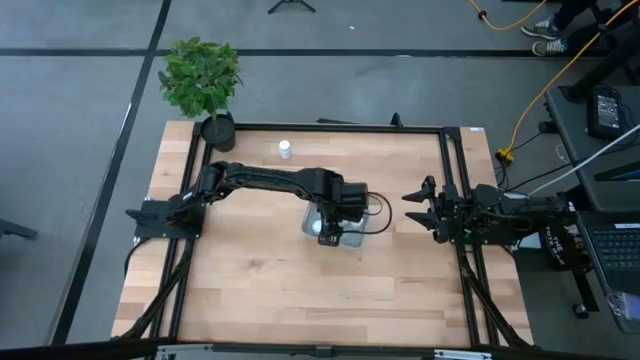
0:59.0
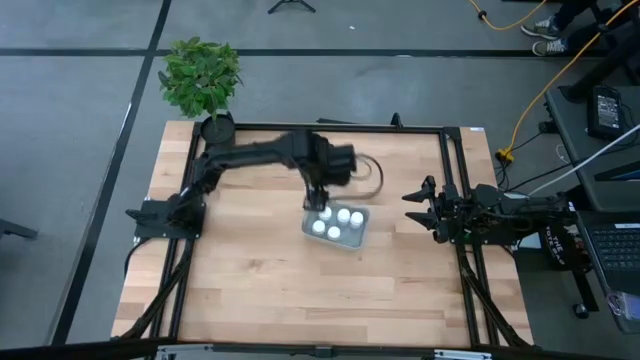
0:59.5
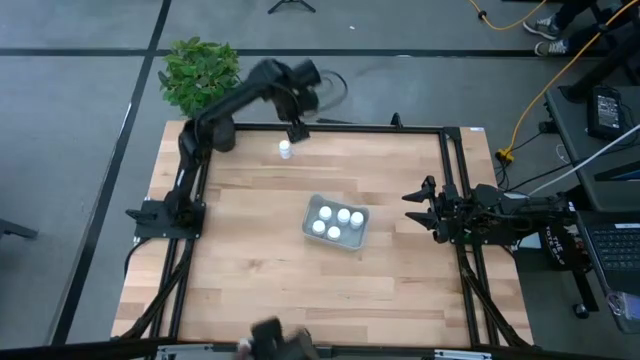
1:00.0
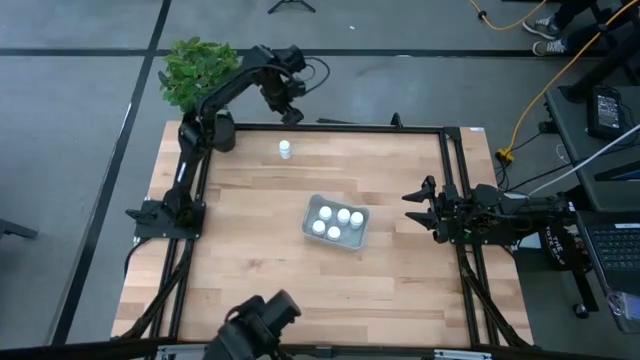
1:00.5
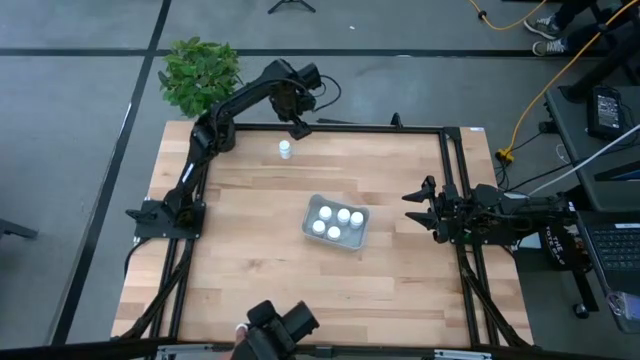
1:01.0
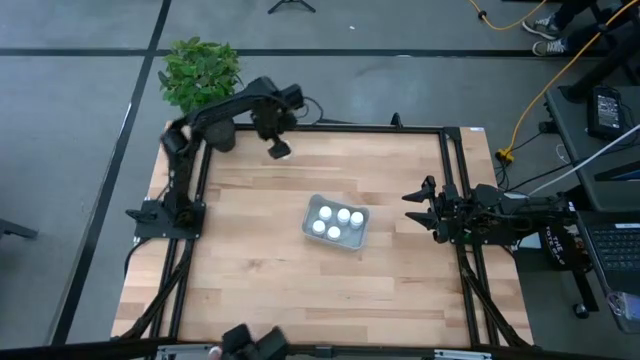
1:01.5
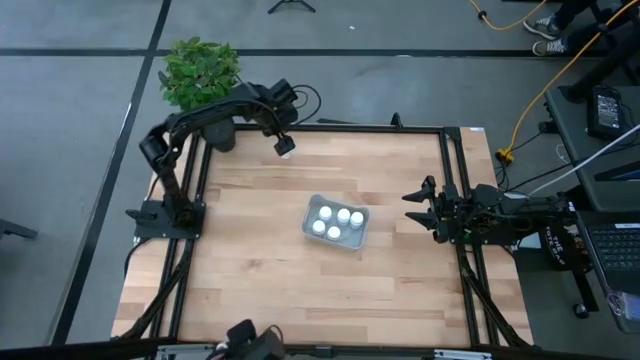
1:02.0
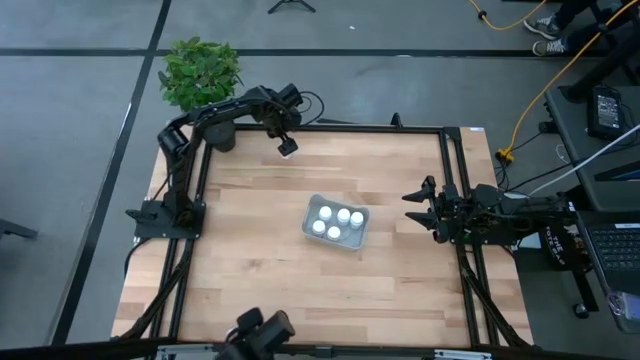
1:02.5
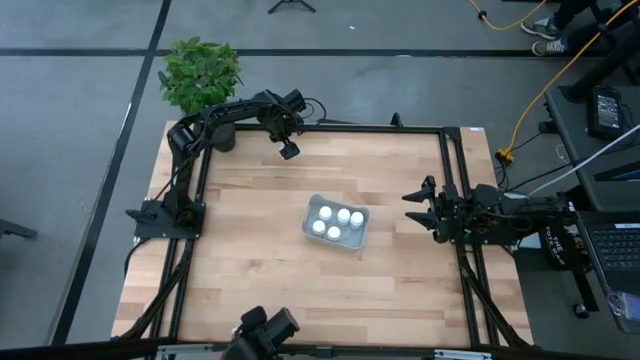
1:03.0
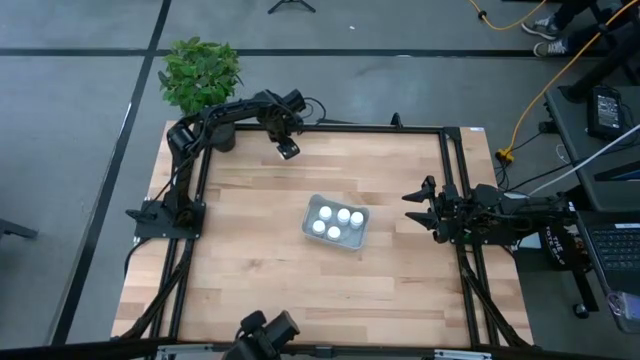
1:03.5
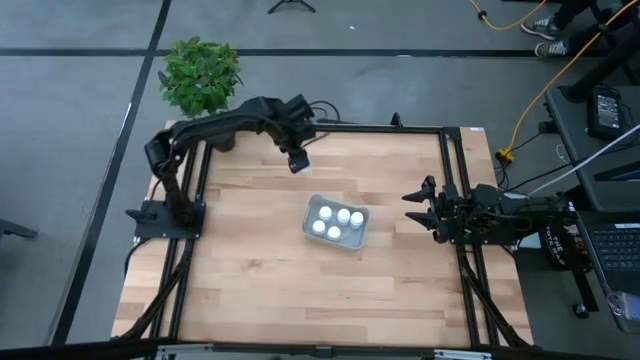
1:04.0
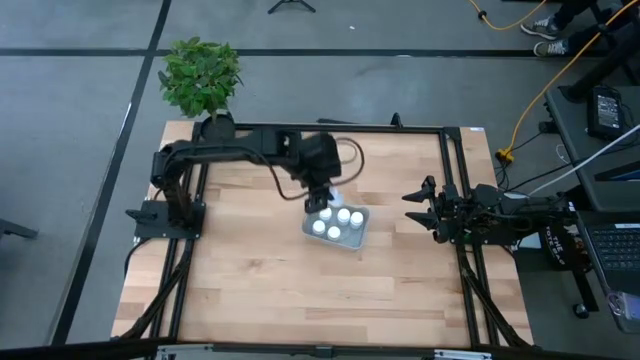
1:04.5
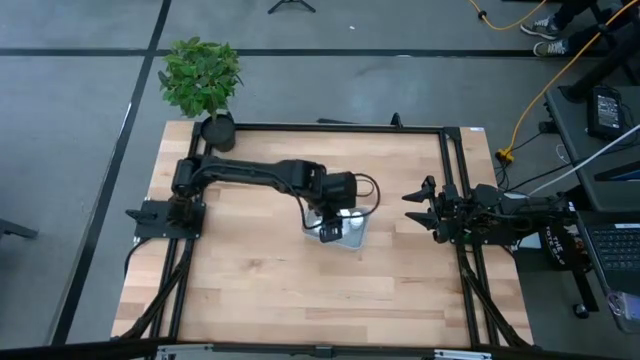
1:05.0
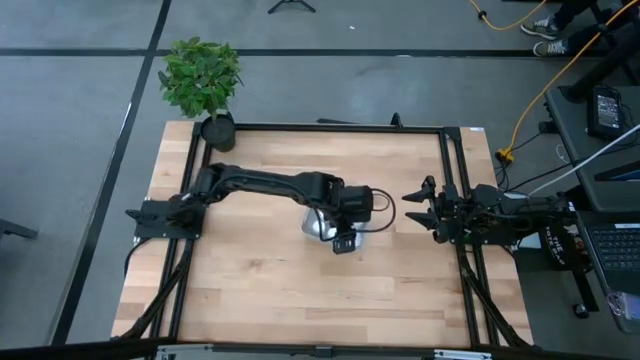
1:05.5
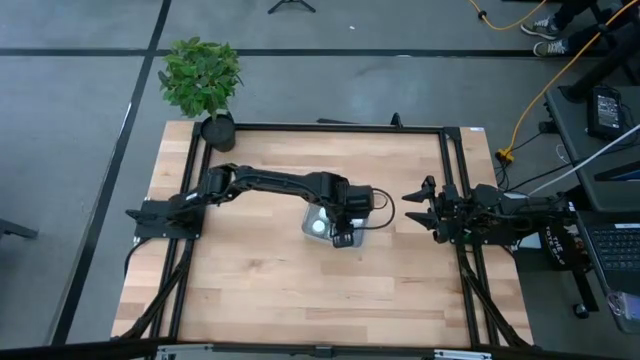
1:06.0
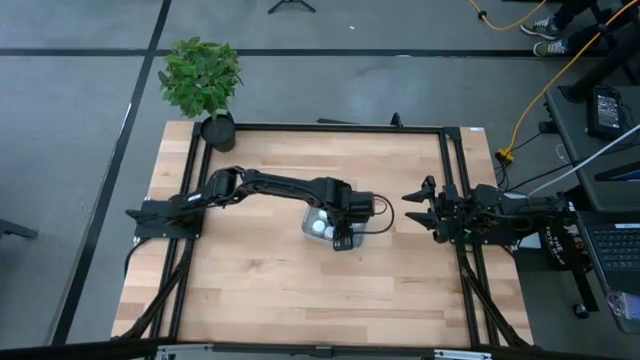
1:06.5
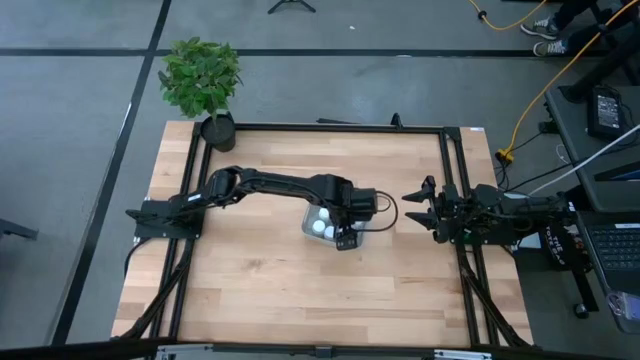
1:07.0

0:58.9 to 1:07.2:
Task: Pick and place pill bottles into a basket
Put the white large pill bottle into the bin

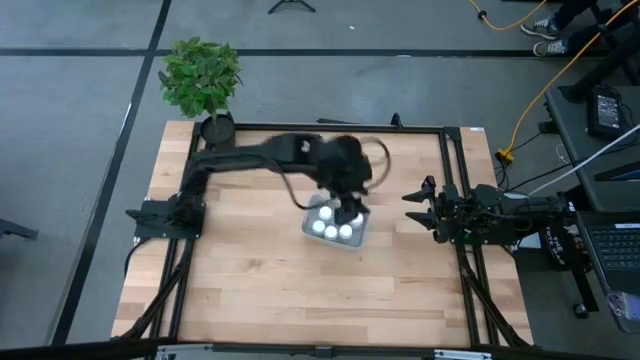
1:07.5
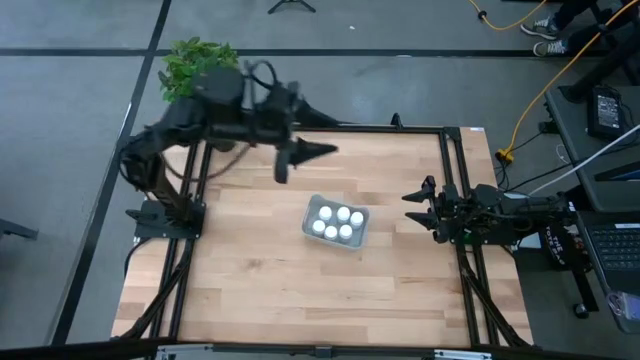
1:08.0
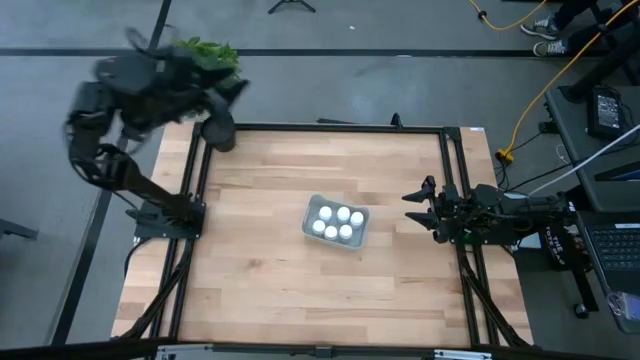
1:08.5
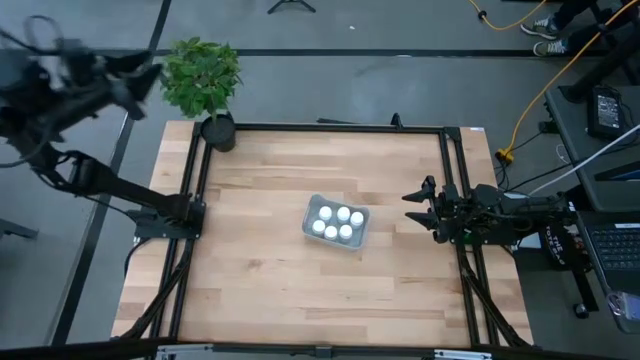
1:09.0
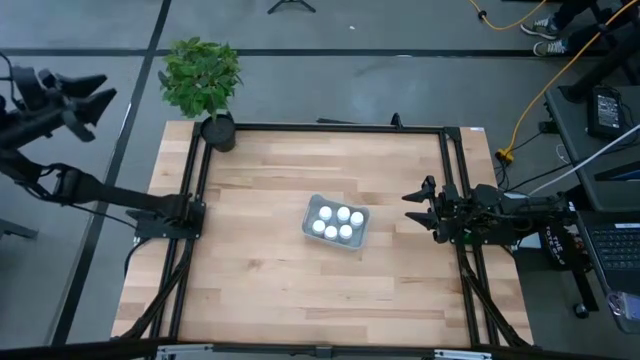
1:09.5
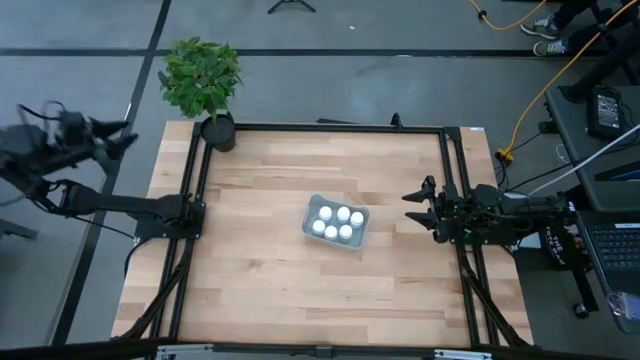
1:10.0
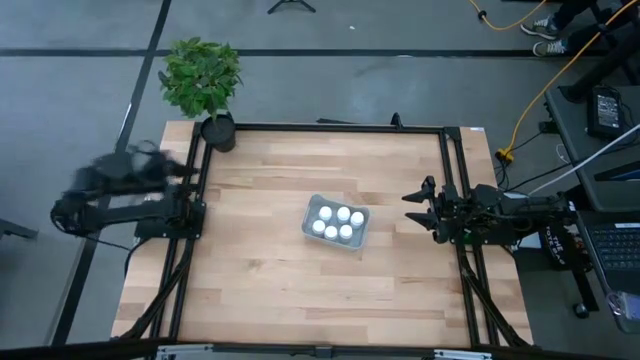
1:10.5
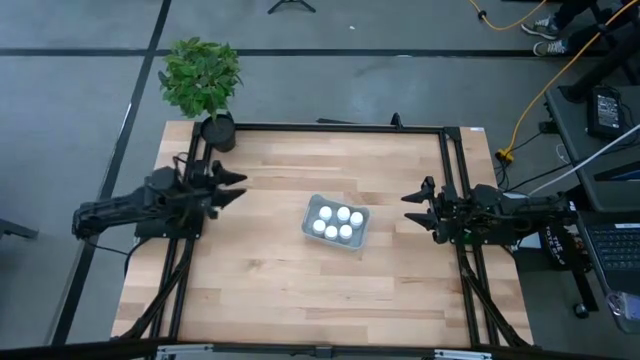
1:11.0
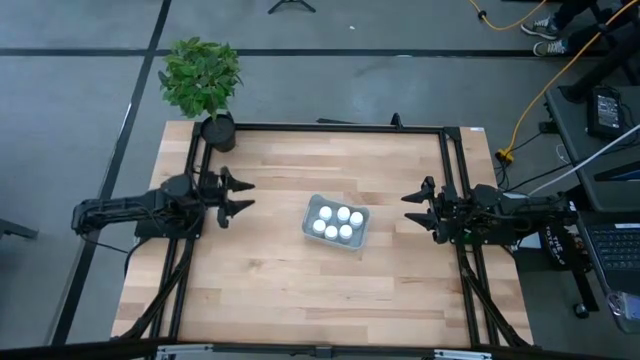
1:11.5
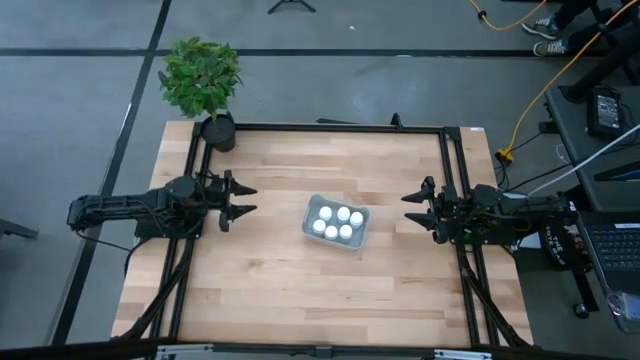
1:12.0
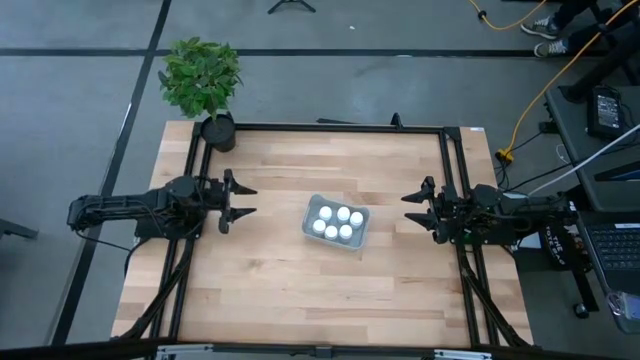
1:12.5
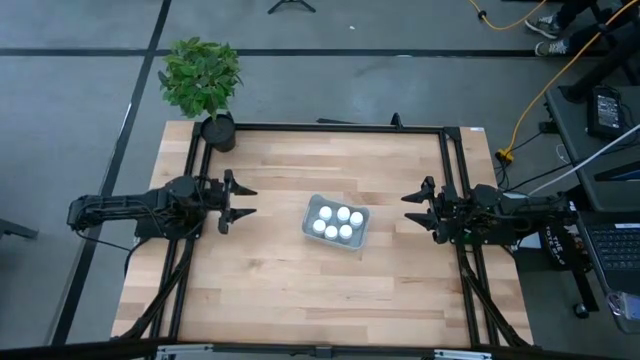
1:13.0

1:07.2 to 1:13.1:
Return to home position

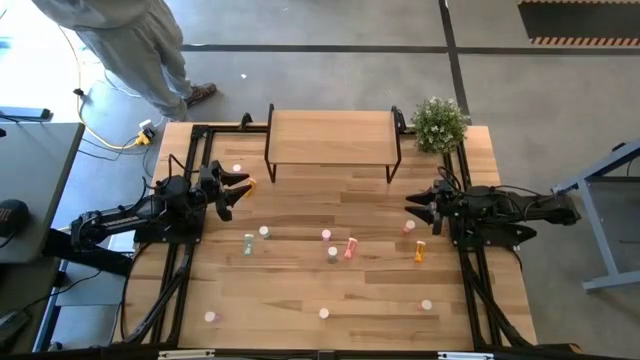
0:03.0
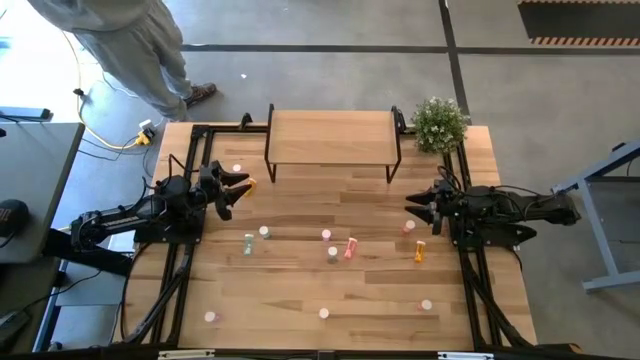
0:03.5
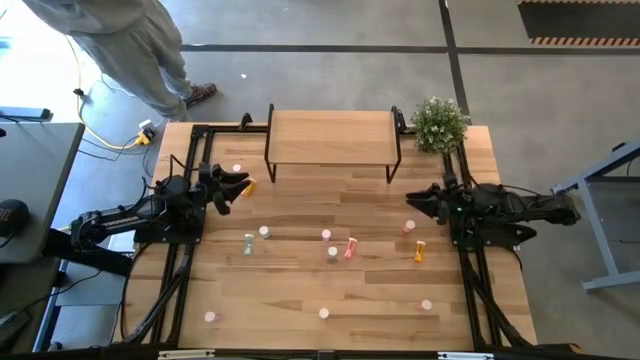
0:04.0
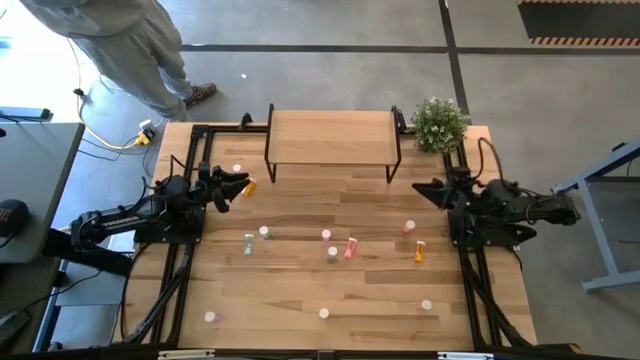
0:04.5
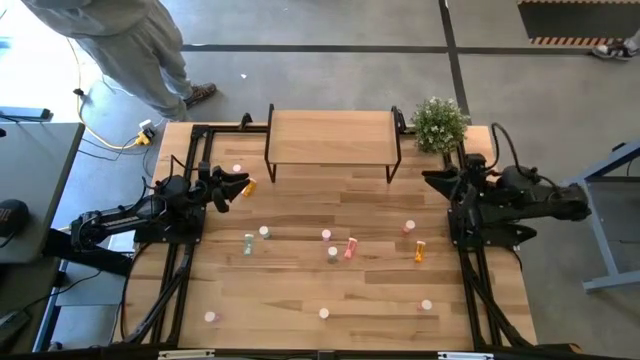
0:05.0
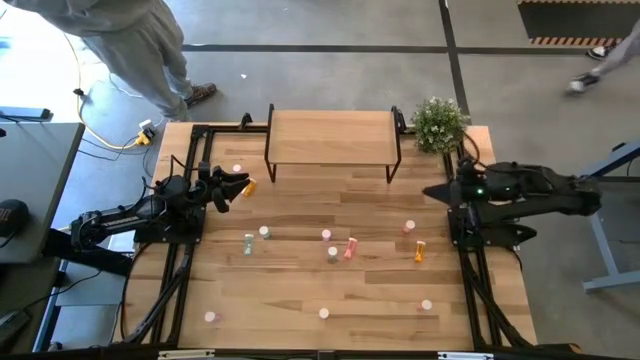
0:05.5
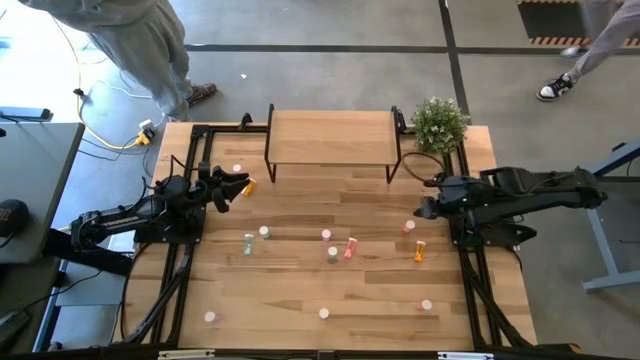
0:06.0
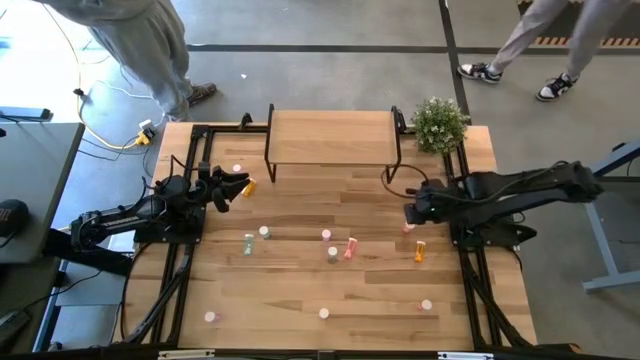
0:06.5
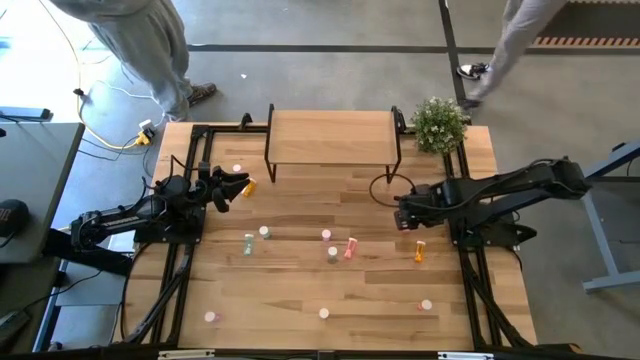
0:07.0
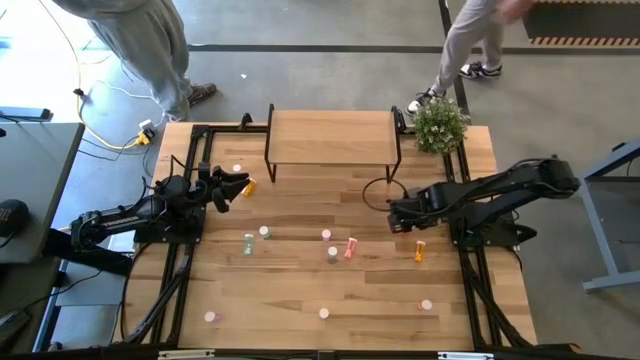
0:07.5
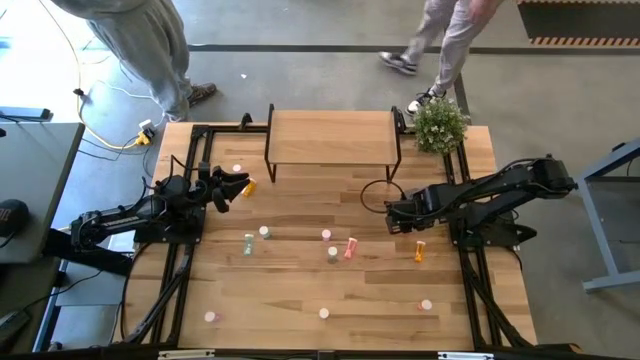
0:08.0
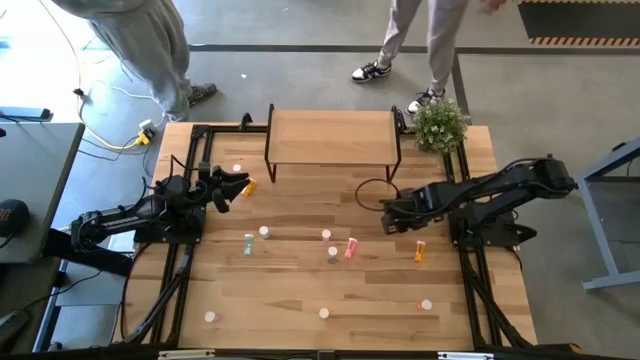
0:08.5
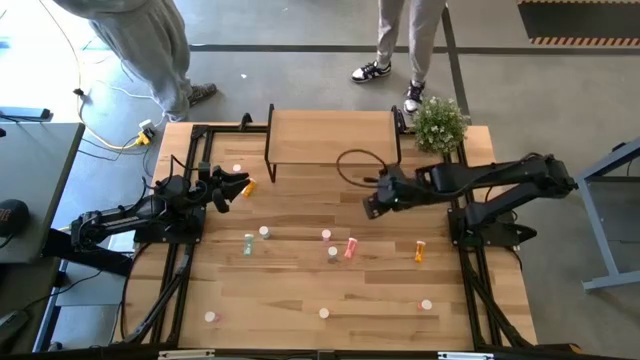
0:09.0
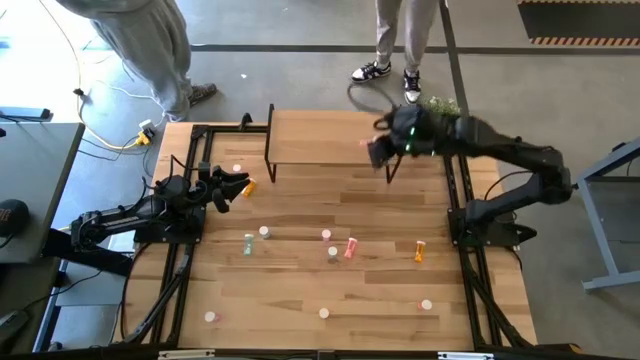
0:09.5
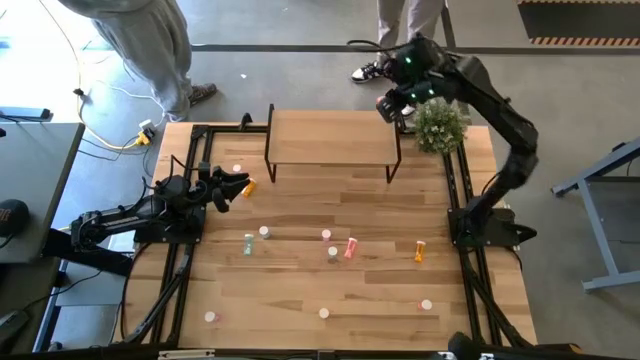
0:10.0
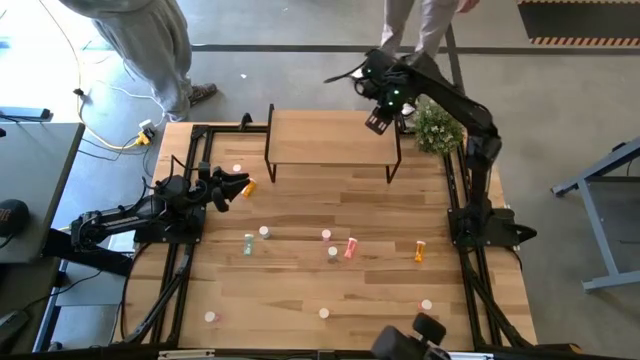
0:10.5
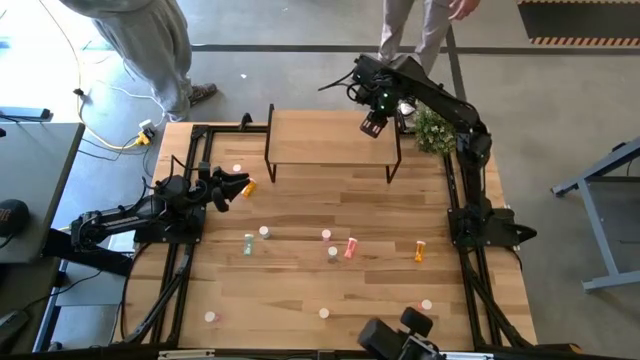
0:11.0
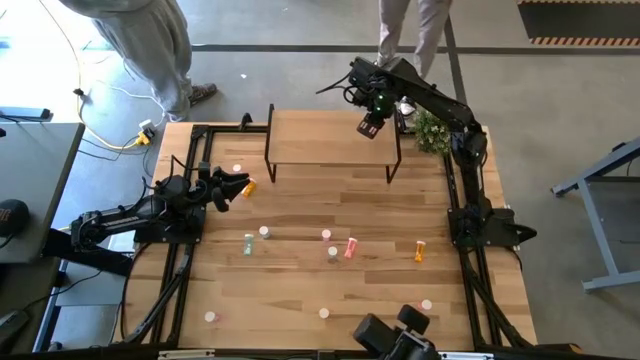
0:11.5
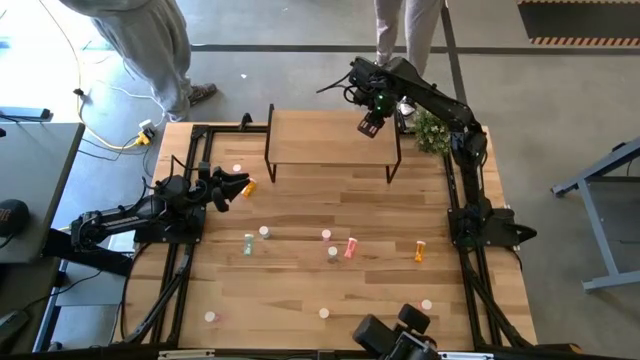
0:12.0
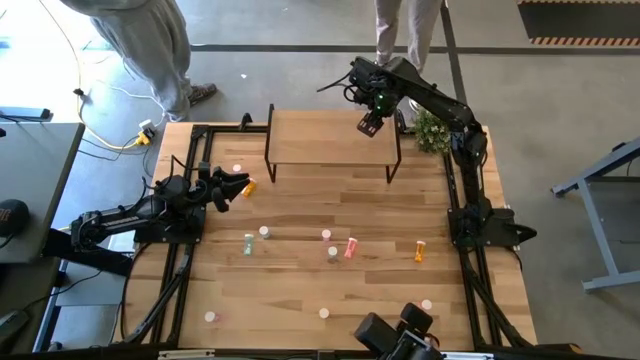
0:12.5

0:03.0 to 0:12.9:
Task: Pick and place medicine bottles onto shelf by color
Put the top right orange pill bottle on the shelf
